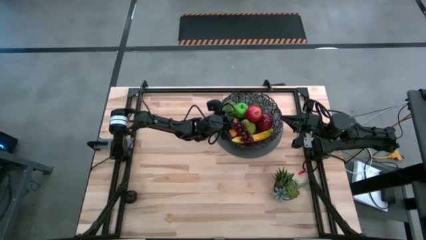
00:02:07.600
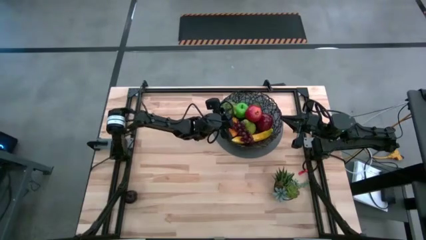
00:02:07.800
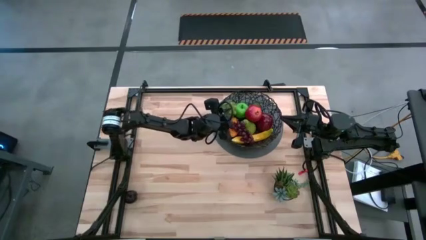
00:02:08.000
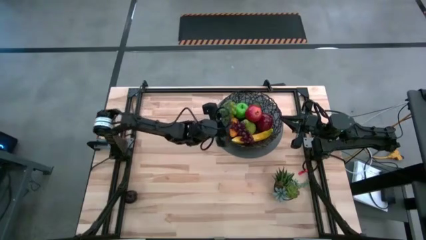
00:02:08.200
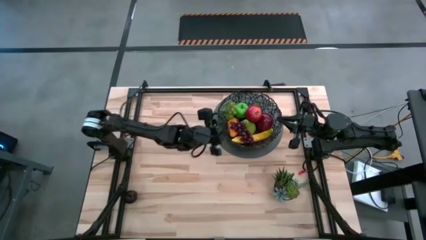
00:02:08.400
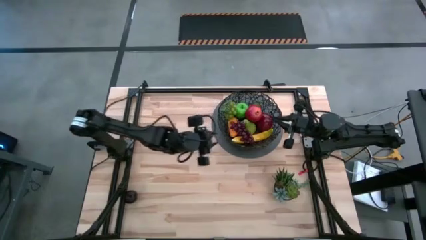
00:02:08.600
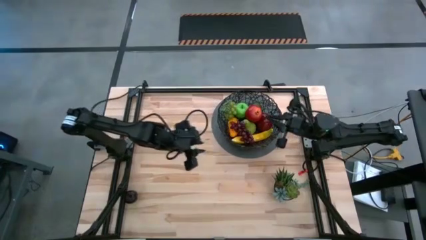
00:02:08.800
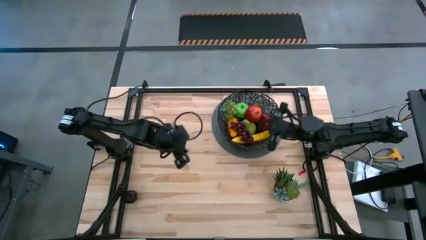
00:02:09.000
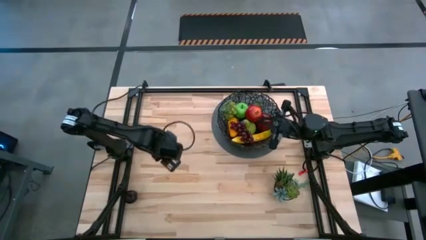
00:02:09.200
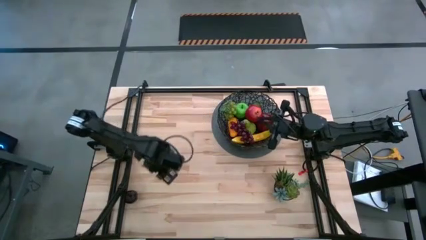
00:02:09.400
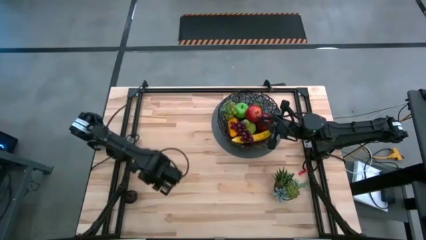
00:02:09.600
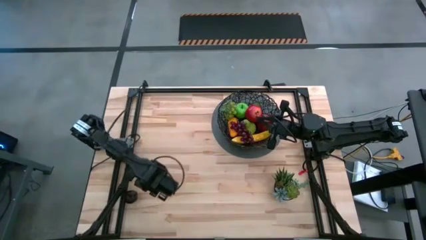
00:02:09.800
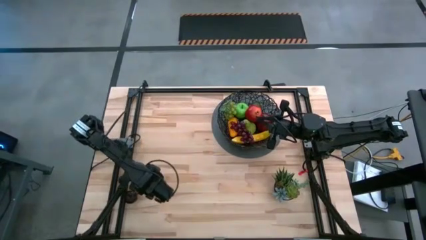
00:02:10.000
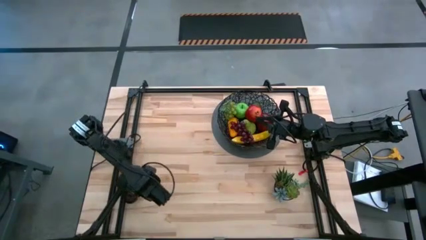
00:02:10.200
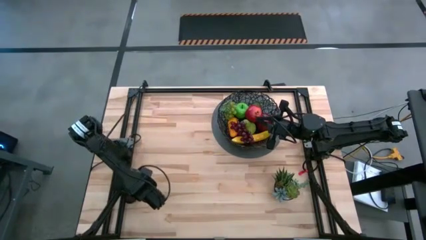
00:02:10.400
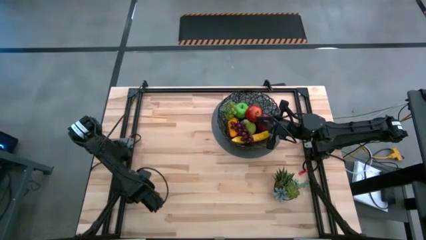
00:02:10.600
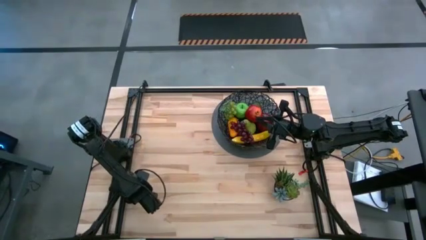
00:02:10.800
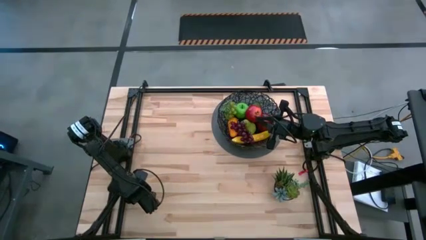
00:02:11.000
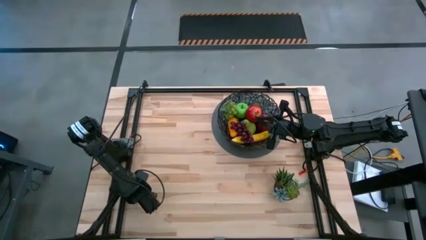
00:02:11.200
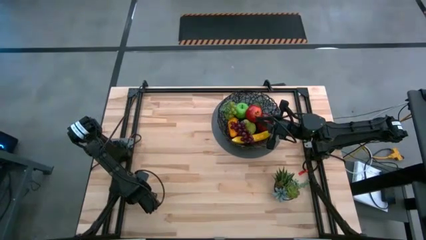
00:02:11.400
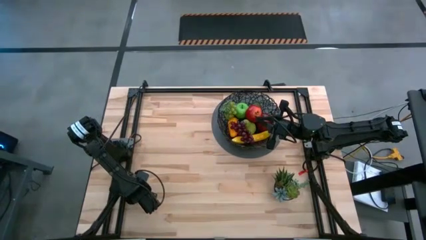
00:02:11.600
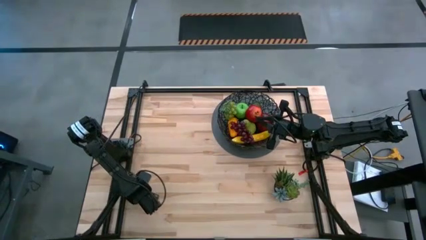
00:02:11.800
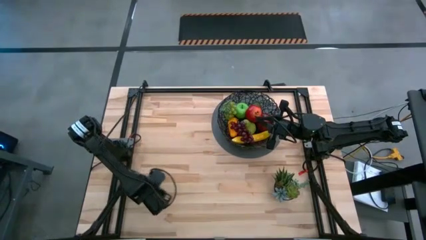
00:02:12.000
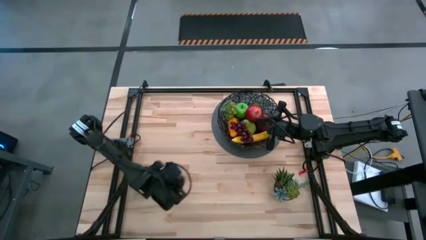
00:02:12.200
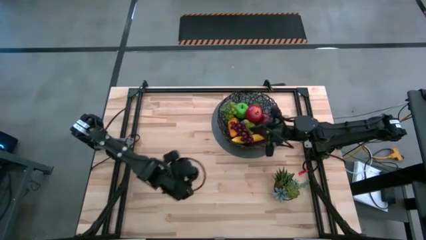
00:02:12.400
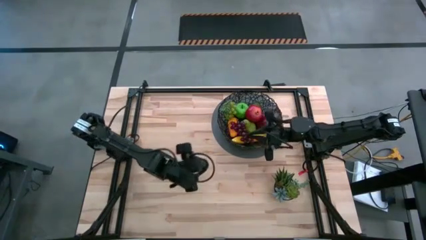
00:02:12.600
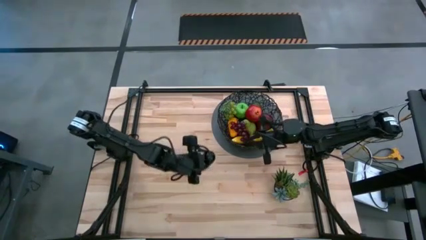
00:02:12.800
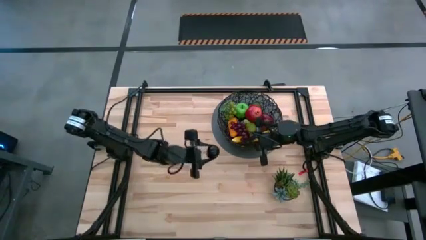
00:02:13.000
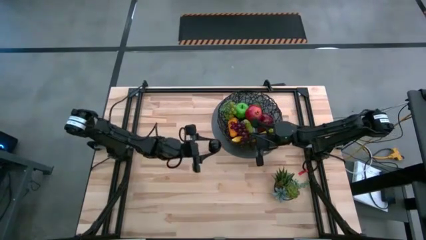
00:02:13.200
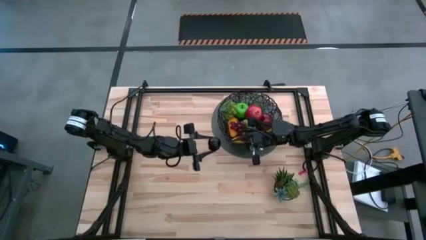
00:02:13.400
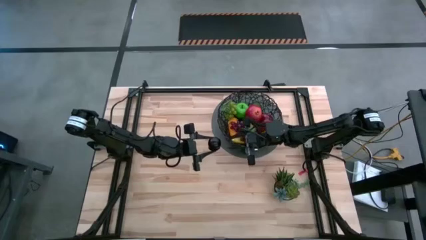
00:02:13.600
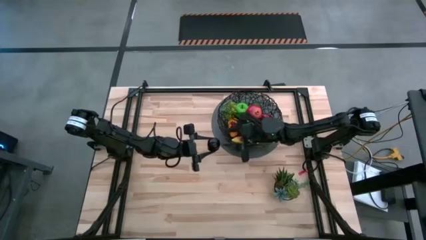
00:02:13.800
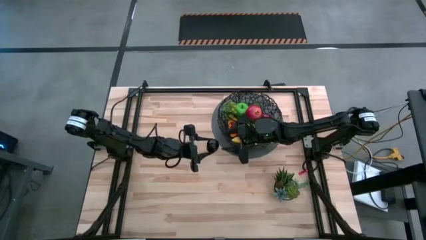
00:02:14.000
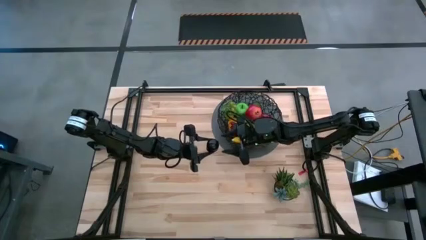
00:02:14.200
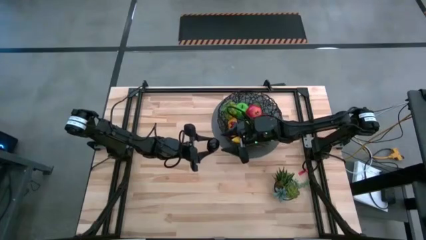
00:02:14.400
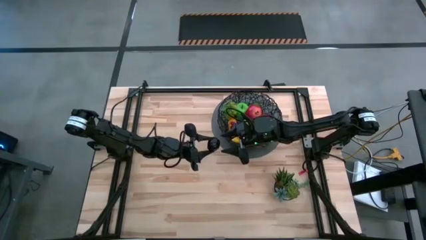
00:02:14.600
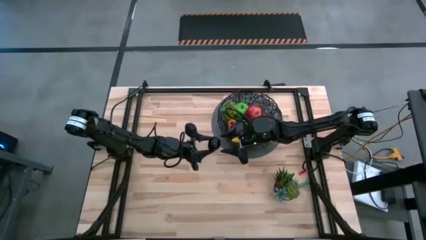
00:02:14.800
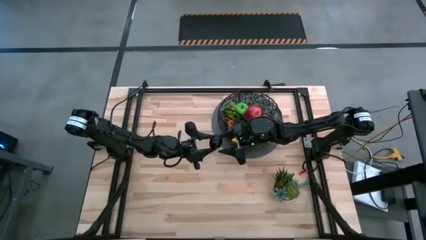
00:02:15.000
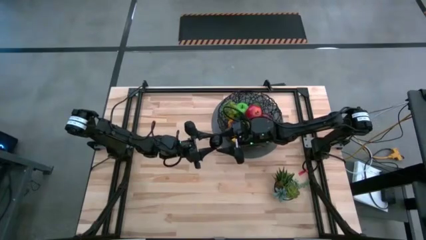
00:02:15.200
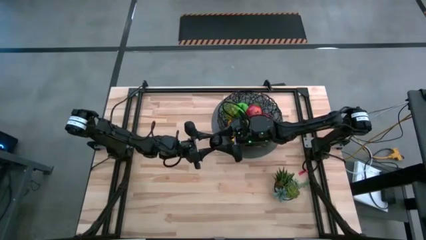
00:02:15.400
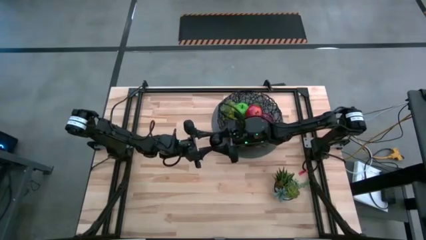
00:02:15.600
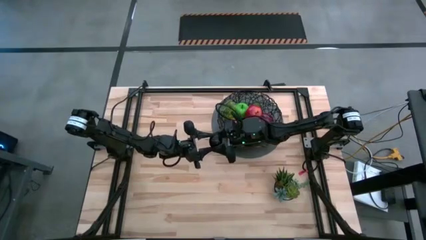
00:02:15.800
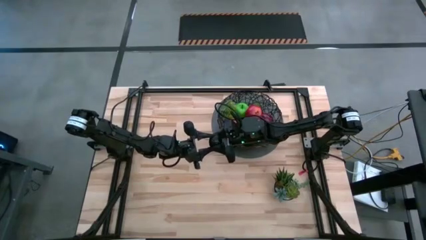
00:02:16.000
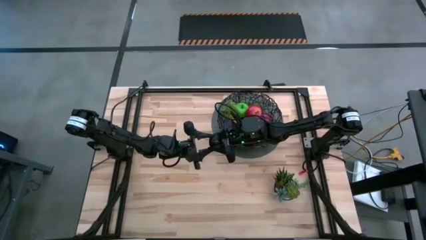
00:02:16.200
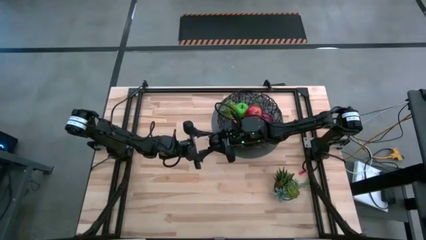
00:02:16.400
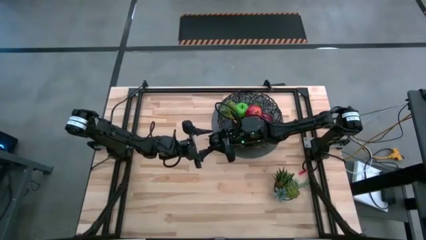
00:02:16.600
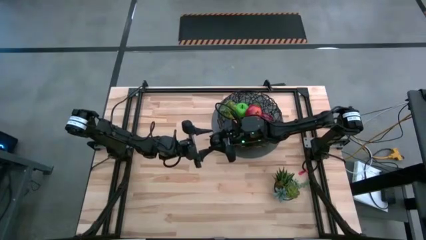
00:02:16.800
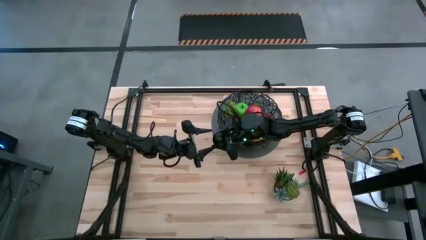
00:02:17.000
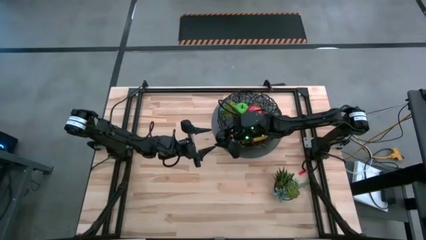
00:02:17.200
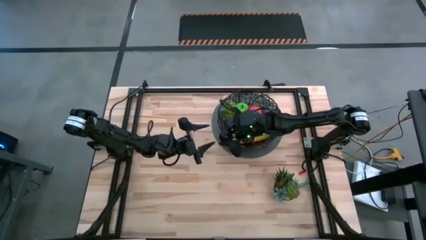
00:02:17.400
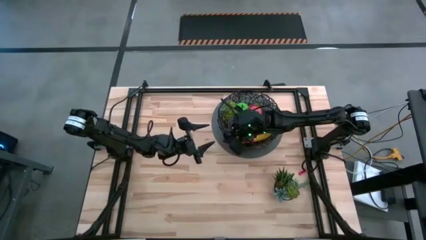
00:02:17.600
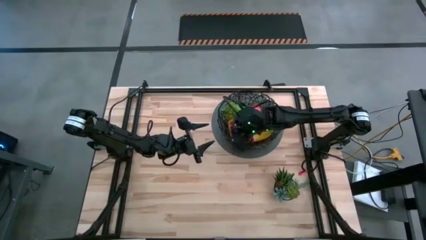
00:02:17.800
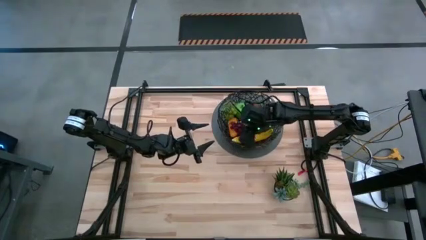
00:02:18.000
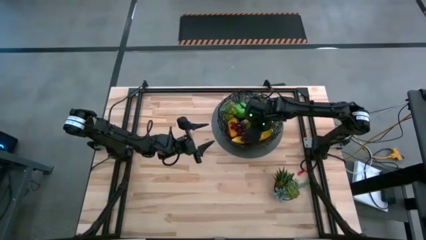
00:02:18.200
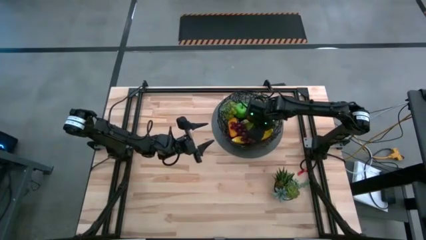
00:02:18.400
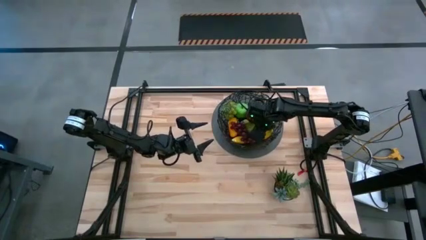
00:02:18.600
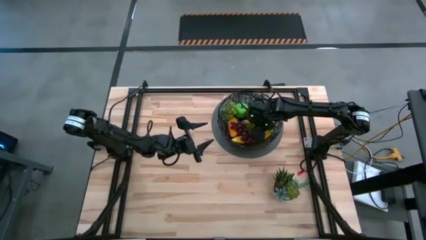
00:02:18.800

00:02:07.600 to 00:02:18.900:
Task: Build produce basket
Put the black plum into the wire basket

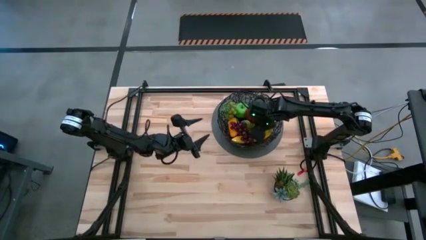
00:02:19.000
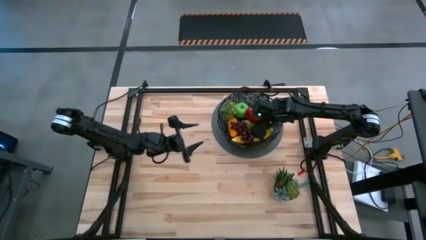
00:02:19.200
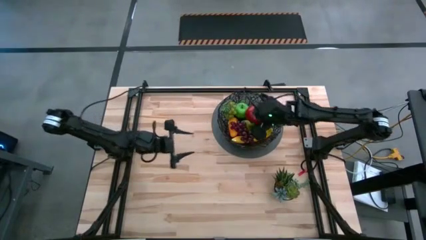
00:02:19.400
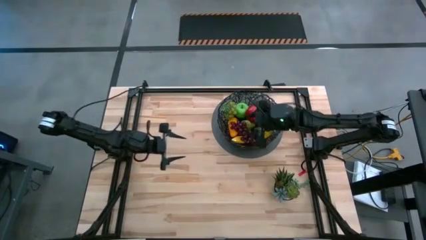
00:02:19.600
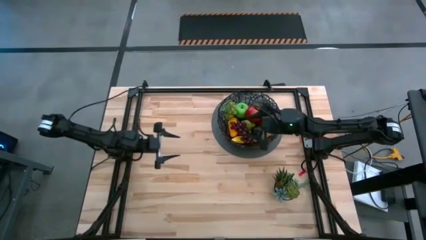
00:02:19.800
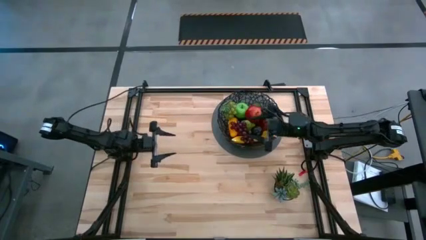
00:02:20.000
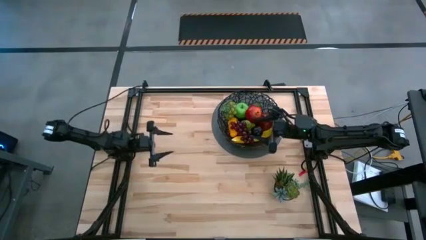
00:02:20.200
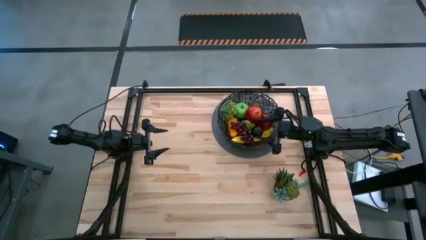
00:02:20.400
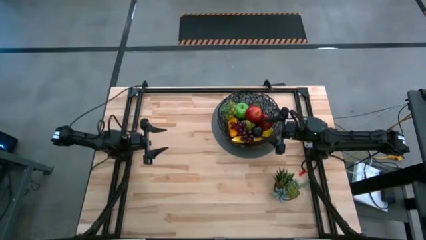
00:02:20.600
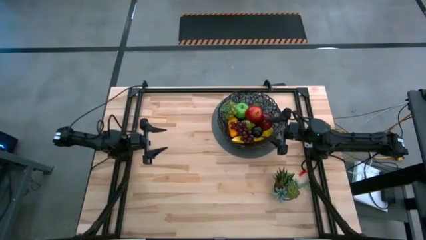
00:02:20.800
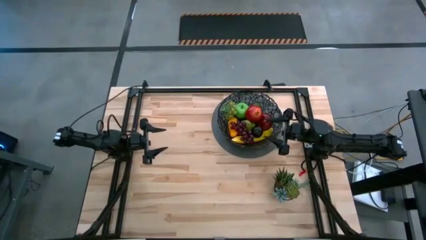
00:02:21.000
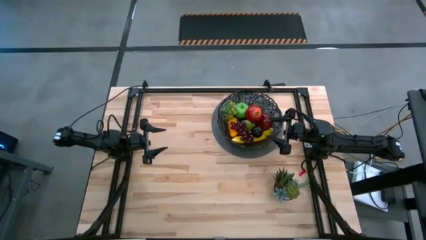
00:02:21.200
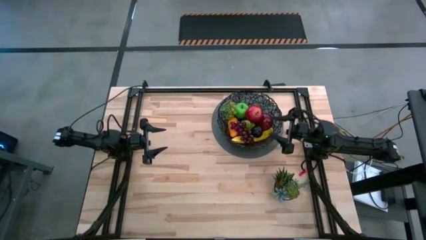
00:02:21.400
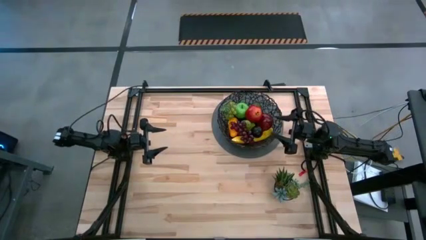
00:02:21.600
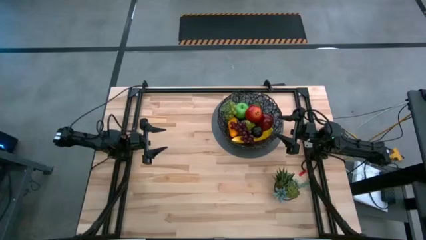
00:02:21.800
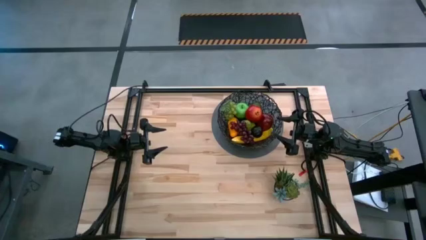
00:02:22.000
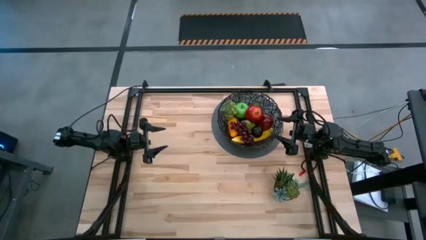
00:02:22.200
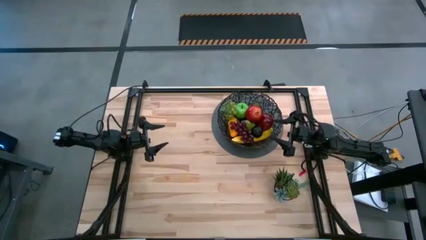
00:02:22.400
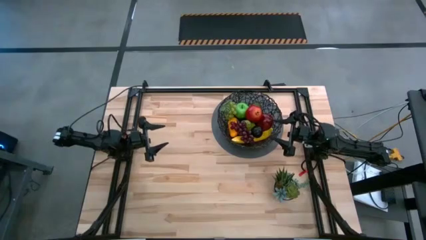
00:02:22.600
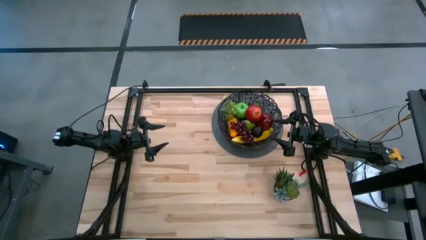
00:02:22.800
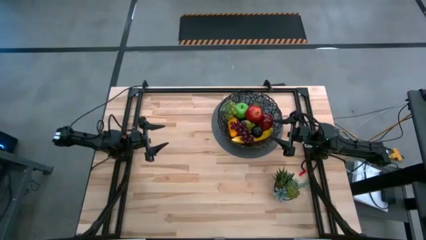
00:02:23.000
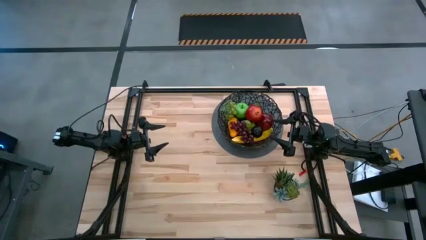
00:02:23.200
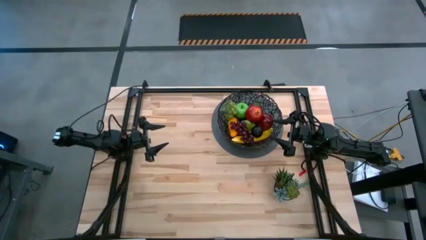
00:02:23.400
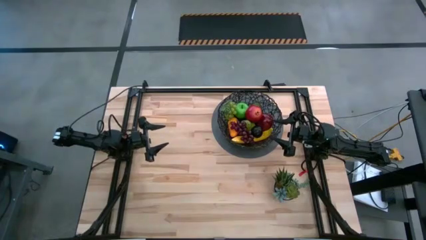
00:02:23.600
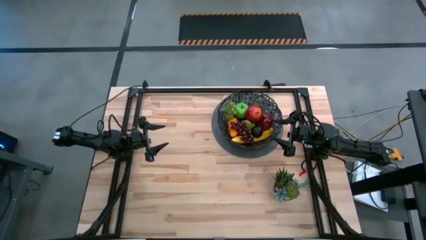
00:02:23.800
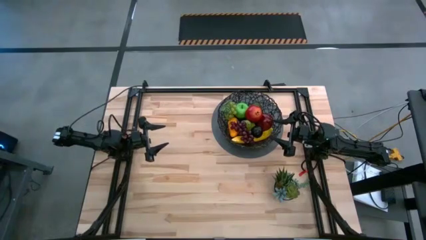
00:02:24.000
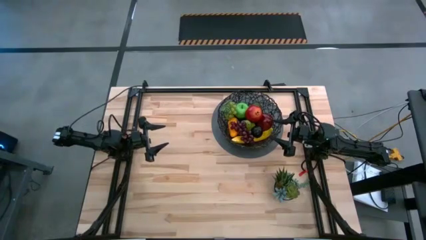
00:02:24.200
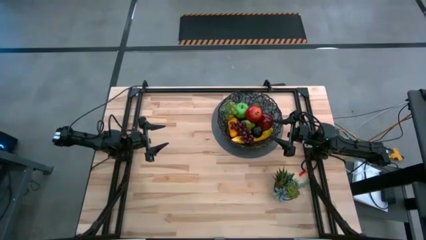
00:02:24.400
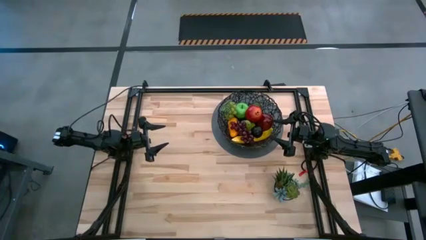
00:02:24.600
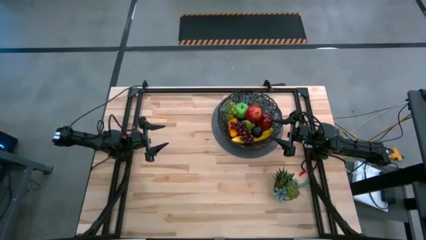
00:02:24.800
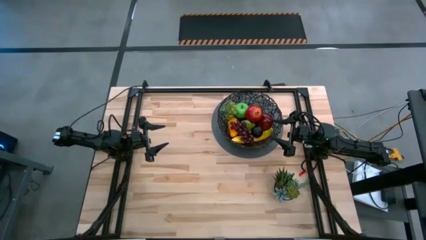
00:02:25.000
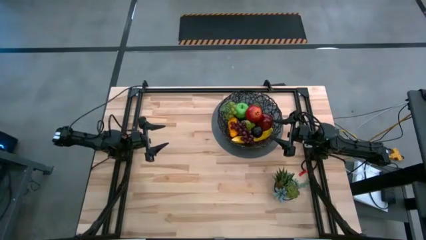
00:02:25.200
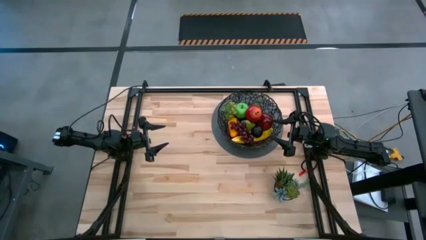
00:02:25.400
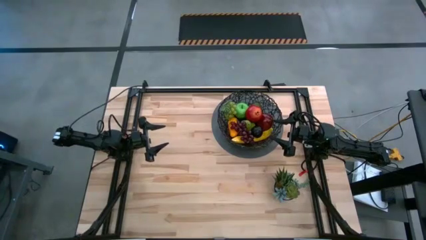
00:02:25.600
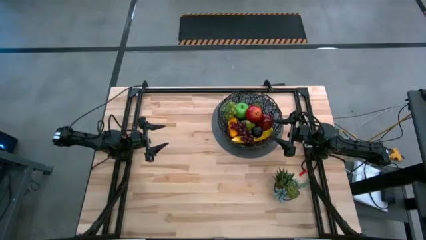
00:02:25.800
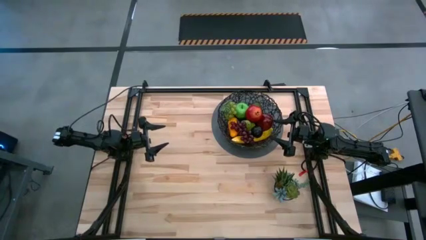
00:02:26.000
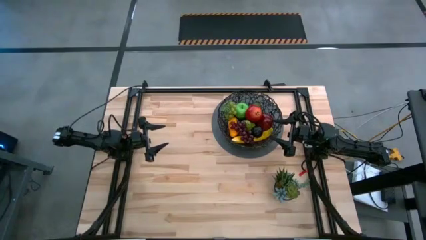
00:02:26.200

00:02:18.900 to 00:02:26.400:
Return to Home Position
